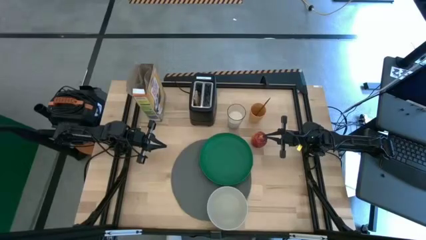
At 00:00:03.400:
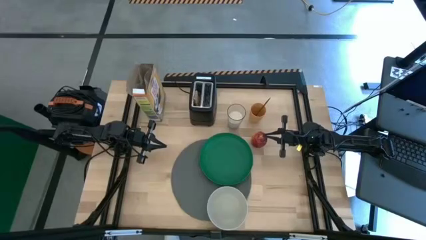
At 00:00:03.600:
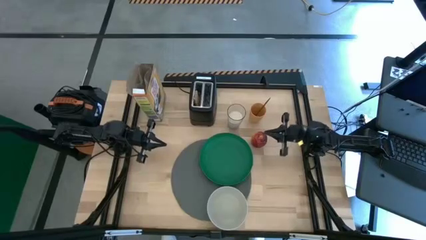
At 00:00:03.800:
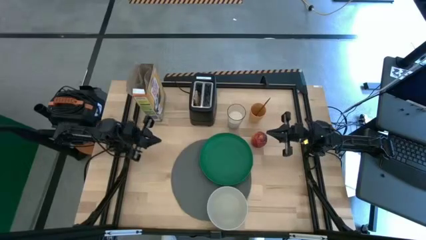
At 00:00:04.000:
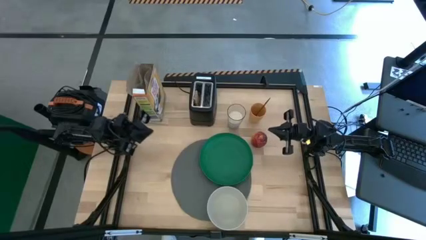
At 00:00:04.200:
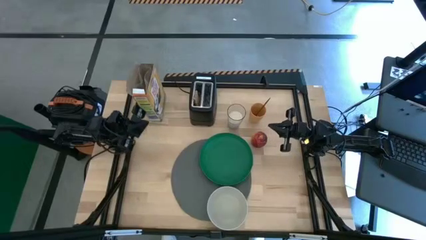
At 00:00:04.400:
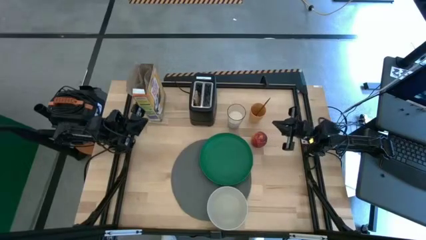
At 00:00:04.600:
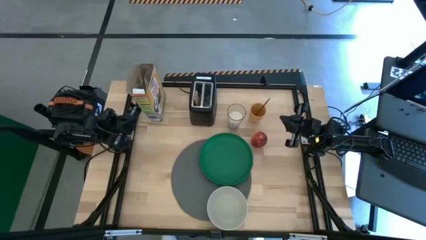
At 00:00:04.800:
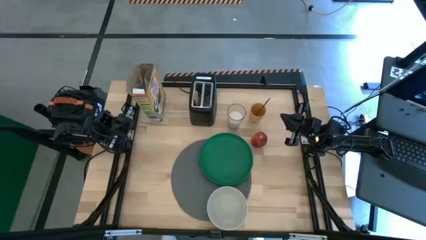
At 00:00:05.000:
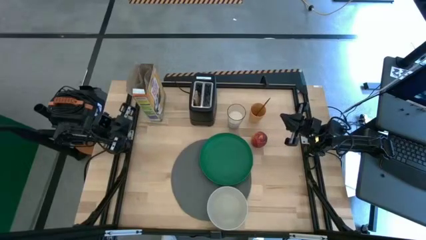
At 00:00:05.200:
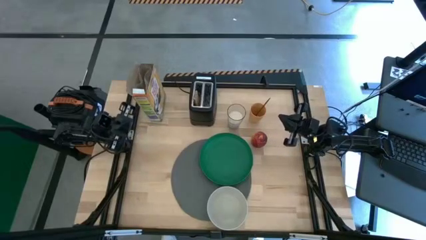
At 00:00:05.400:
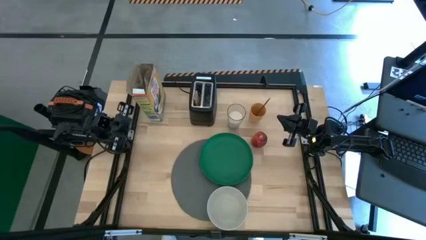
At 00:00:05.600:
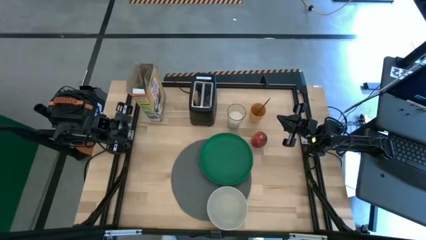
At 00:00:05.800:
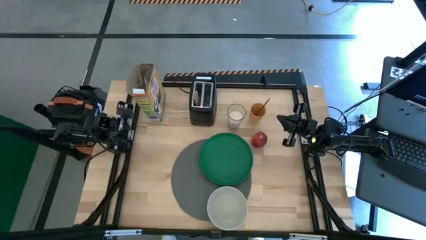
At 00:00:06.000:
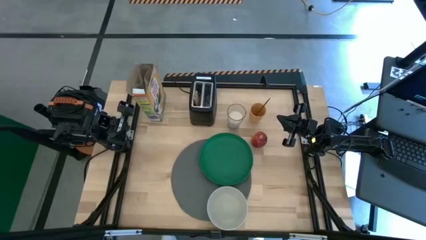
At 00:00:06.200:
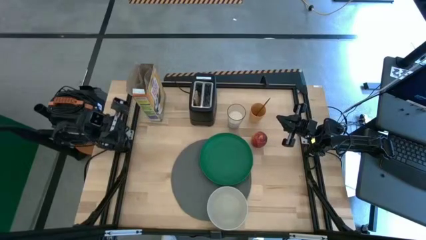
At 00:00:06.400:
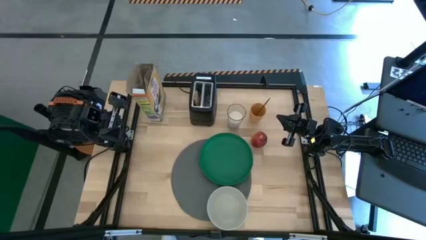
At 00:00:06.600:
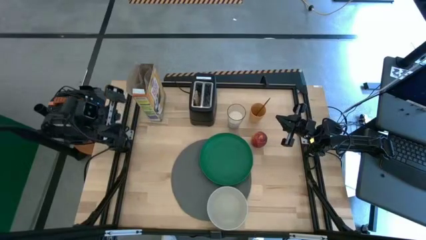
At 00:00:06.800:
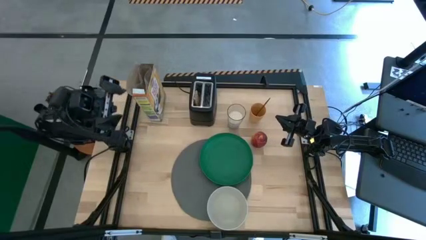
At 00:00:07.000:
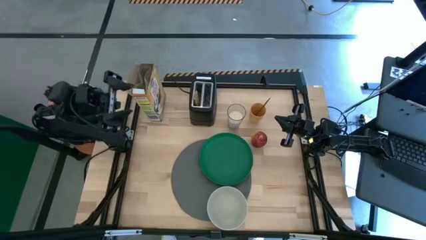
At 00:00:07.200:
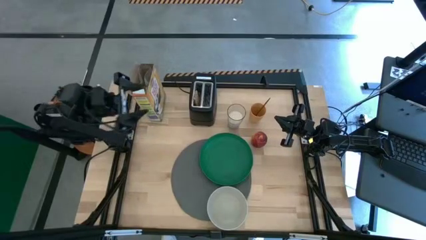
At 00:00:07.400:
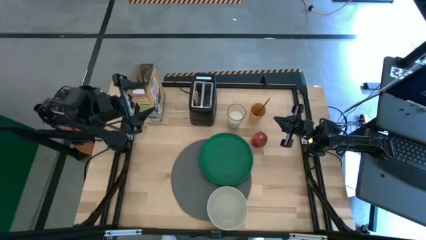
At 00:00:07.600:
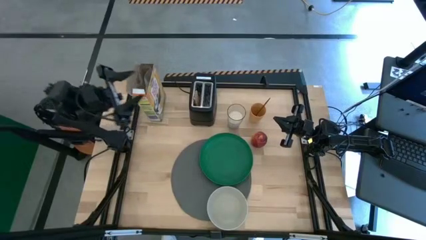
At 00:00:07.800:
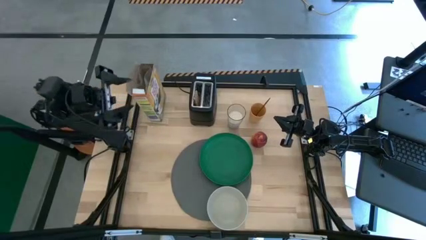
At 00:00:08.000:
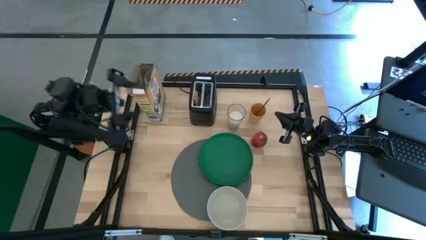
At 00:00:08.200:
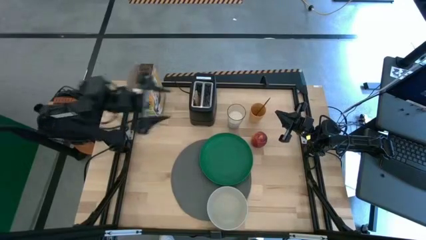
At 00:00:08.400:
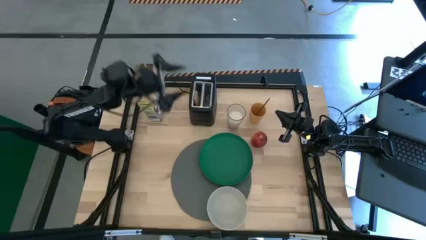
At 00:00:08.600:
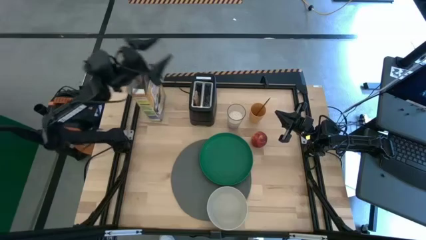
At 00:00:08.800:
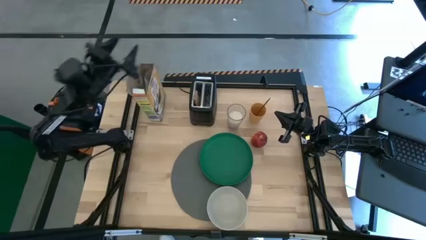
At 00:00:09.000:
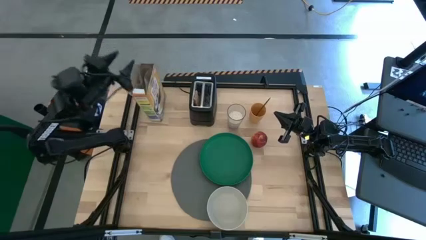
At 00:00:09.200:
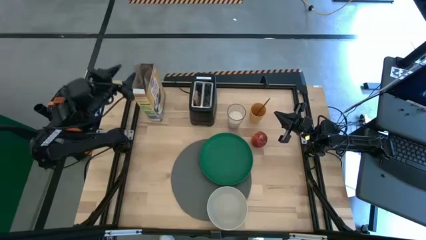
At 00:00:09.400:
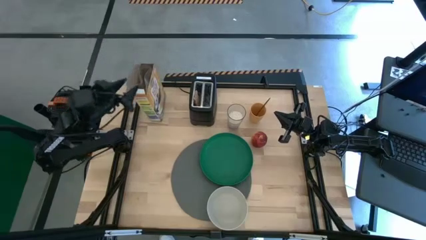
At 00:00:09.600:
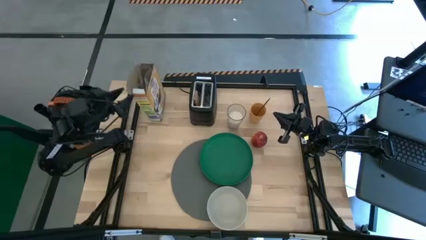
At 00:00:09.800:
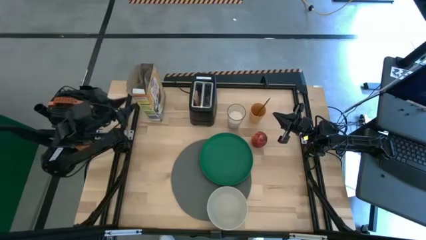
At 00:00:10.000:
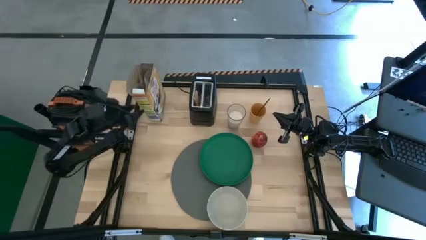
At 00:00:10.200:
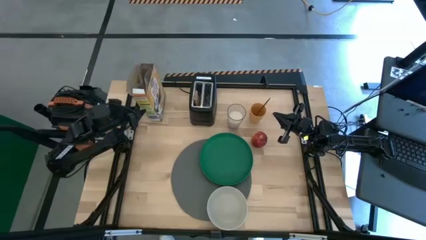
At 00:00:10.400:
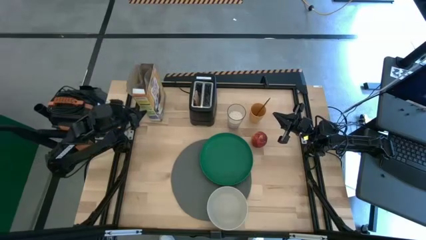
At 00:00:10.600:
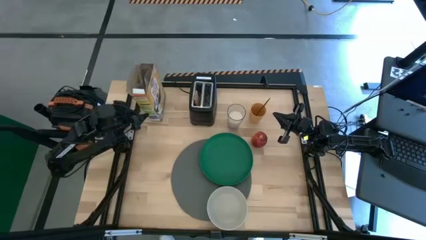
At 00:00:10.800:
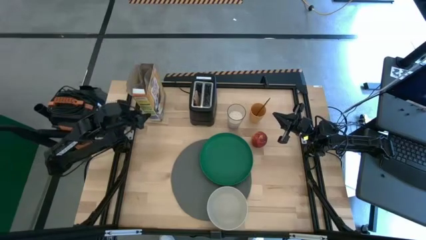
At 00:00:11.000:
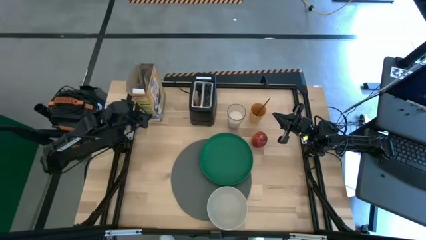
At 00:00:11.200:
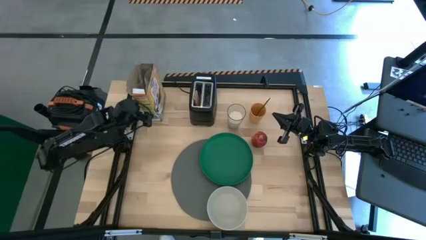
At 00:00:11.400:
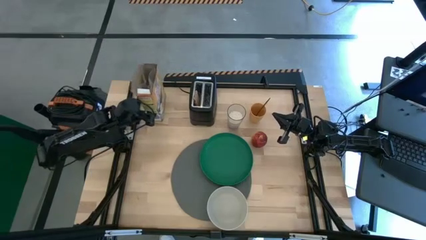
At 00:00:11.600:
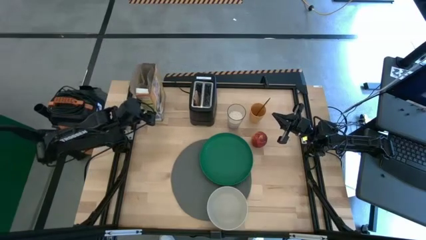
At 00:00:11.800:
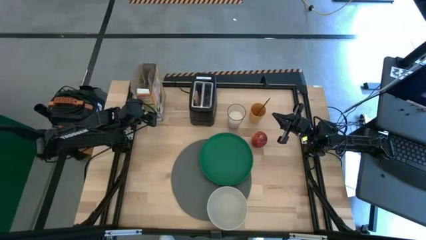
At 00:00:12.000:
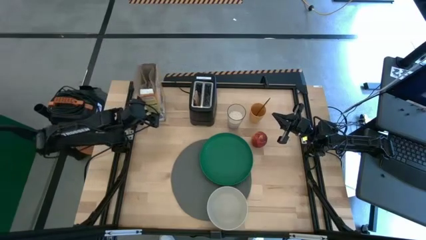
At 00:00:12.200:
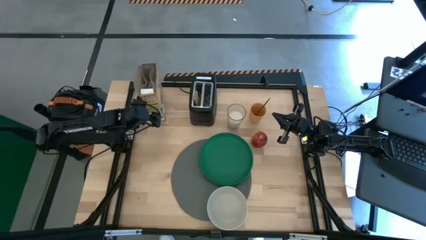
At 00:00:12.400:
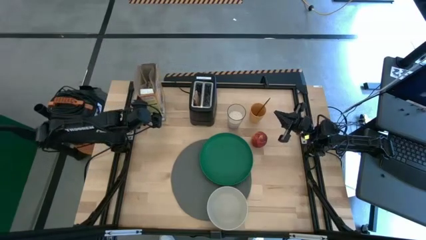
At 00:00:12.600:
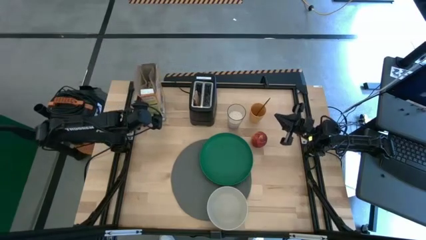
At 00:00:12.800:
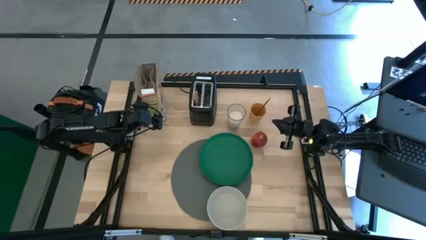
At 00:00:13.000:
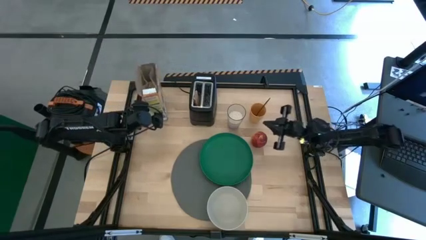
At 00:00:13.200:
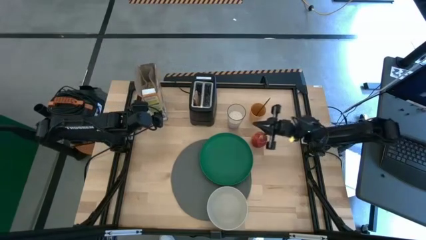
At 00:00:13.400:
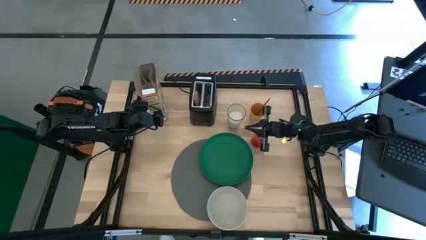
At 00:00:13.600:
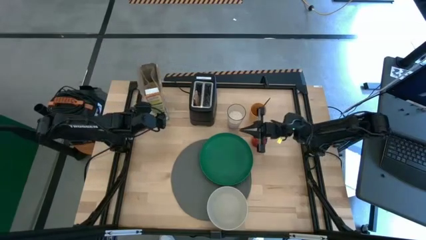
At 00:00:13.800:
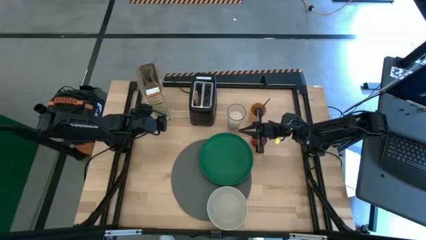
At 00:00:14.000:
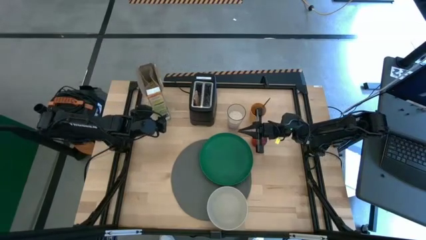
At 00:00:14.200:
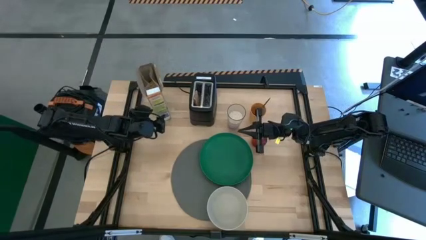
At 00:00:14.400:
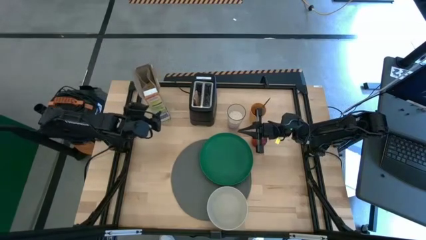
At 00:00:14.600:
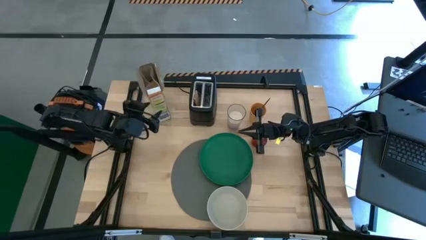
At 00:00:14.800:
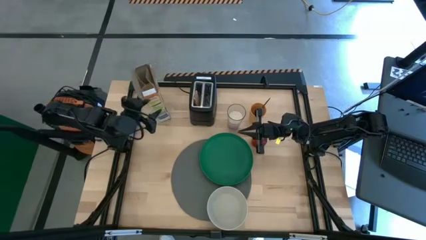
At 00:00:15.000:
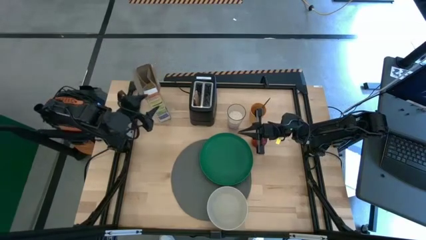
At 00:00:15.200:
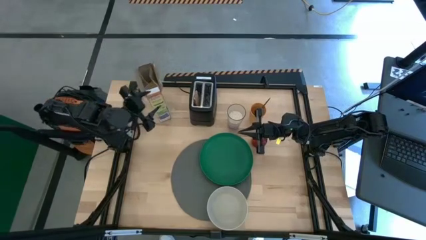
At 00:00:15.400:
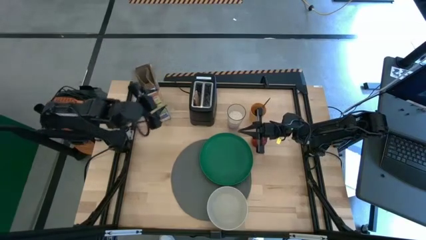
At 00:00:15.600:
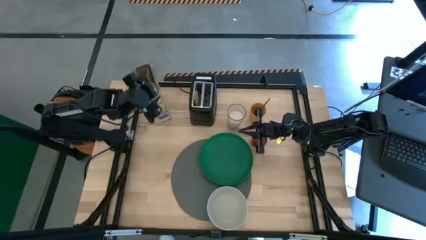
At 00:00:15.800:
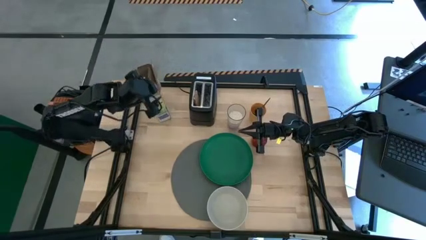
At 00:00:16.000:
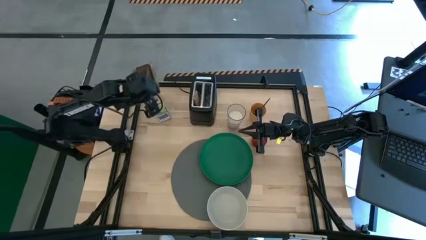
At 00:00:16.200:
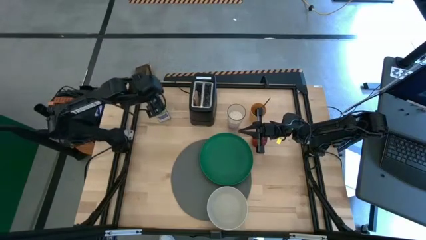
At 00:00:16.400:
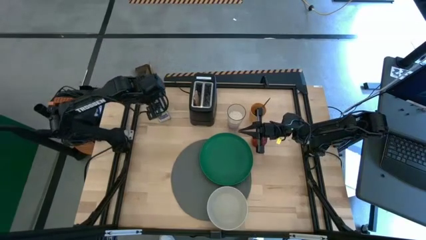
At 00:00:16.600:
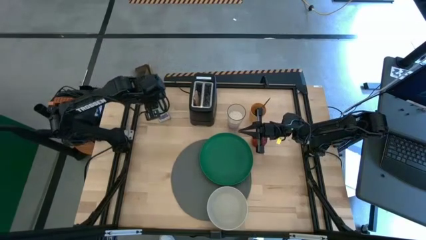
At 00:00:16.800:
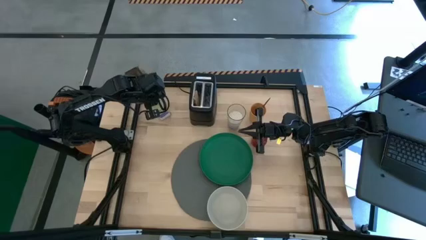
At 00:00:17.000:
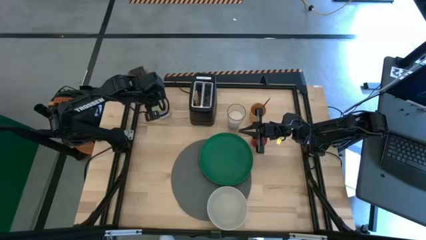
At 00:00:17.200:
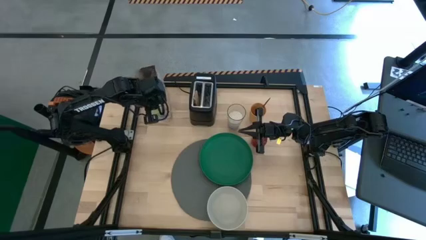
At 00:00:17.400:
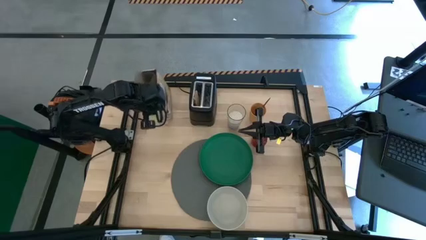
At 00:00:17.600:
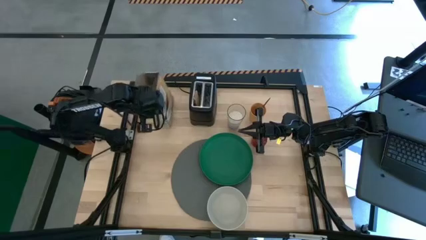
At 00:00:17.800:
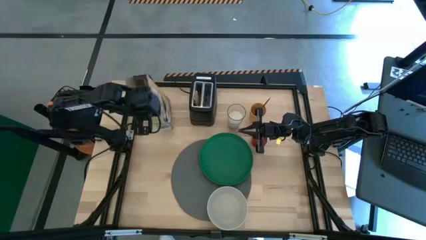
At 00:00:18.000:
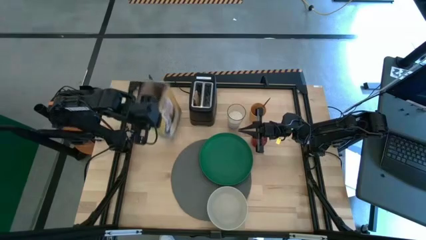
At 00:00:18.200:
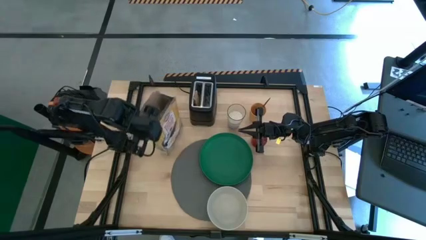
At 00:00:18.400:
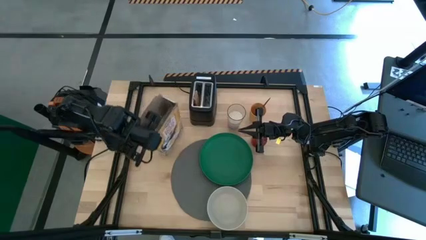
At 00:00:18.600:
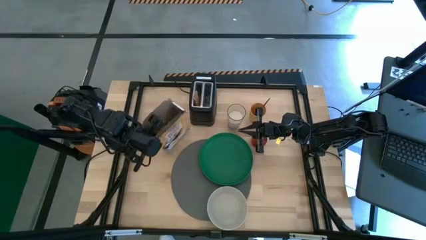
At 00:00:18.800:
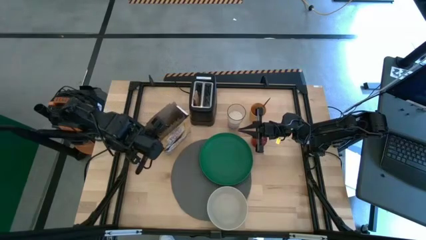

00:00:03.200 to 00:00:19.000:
Task: Arrange a breakfast setting
Pour the cereal into the white bowl
